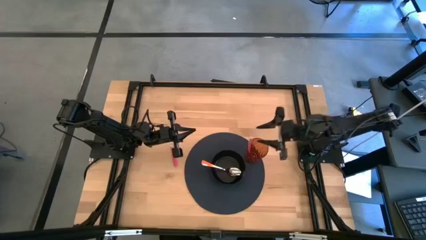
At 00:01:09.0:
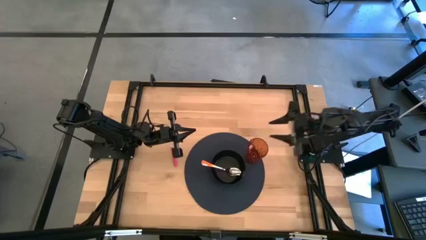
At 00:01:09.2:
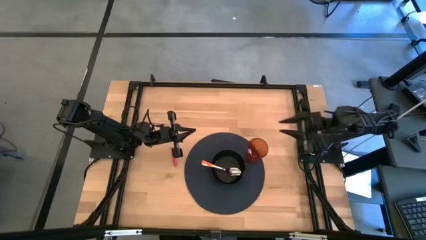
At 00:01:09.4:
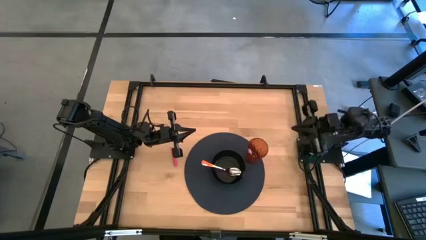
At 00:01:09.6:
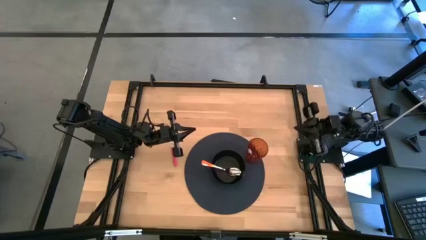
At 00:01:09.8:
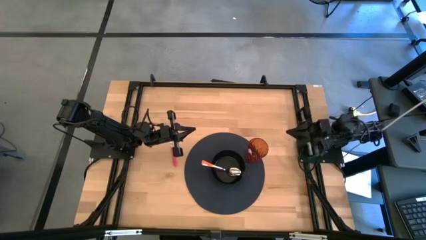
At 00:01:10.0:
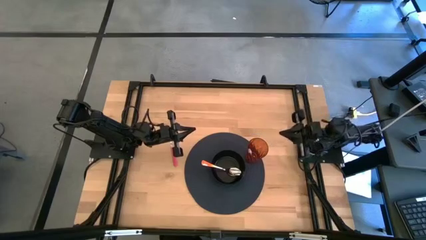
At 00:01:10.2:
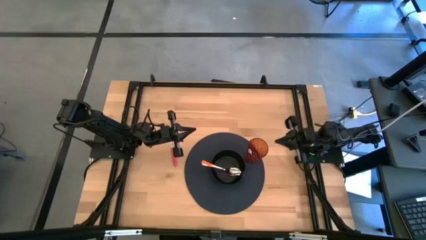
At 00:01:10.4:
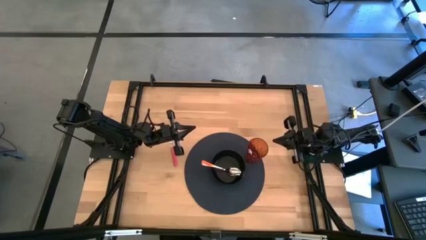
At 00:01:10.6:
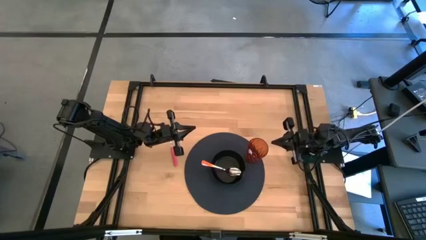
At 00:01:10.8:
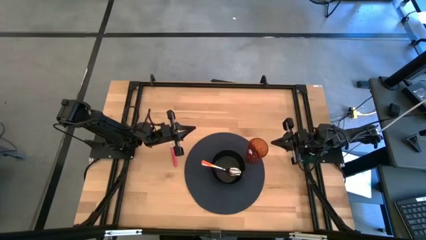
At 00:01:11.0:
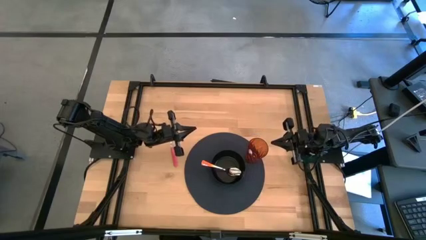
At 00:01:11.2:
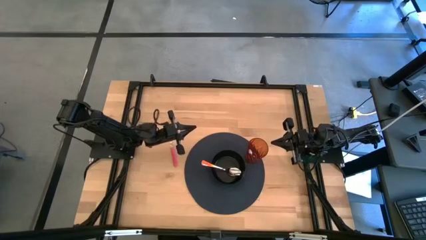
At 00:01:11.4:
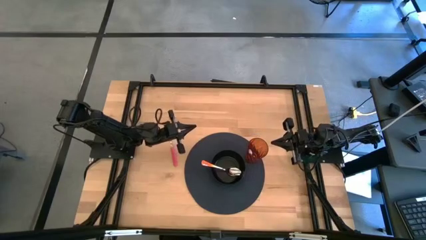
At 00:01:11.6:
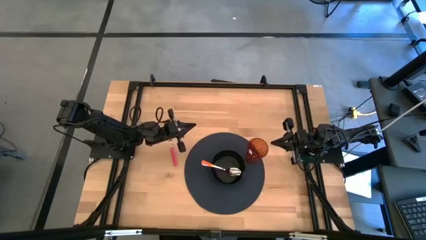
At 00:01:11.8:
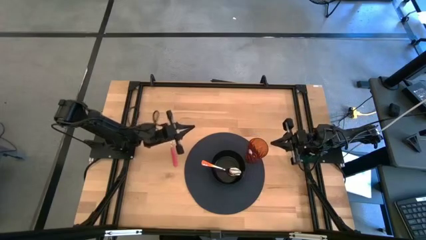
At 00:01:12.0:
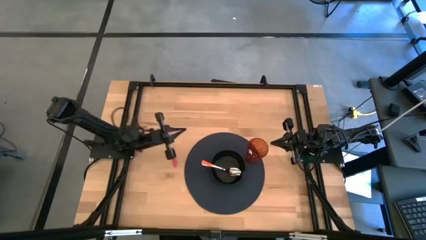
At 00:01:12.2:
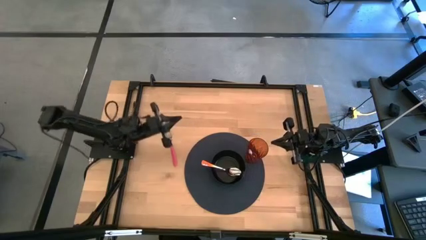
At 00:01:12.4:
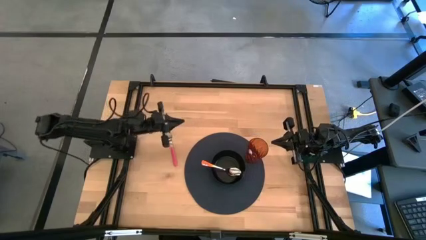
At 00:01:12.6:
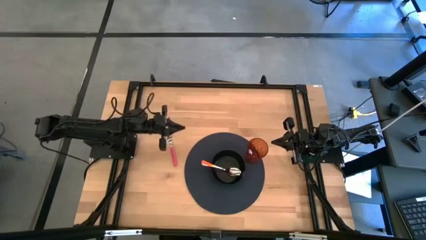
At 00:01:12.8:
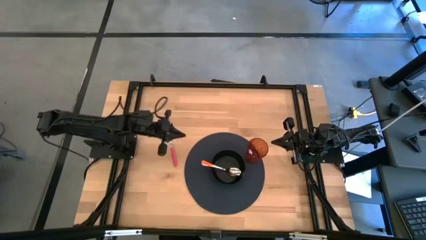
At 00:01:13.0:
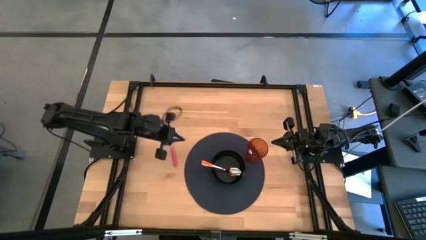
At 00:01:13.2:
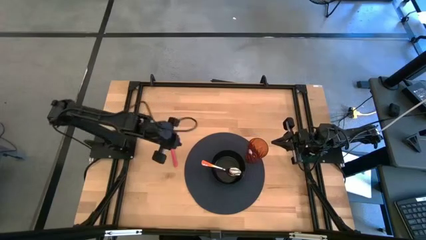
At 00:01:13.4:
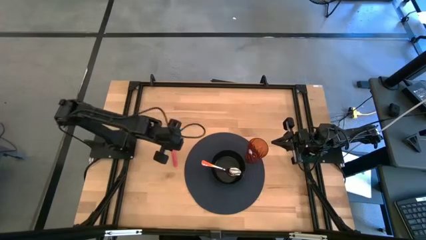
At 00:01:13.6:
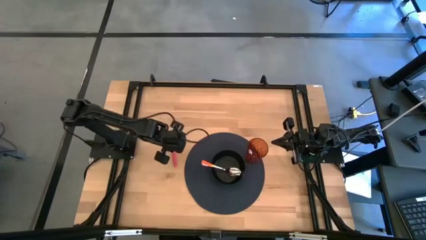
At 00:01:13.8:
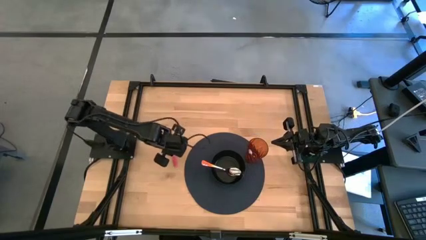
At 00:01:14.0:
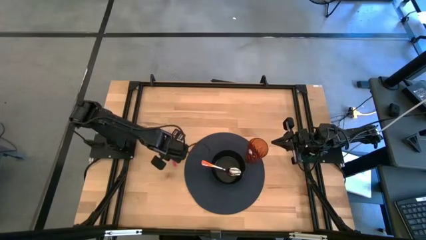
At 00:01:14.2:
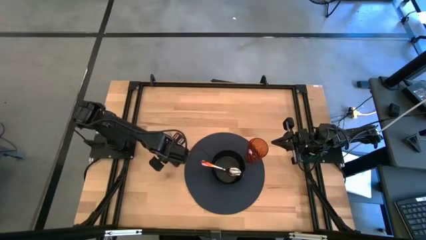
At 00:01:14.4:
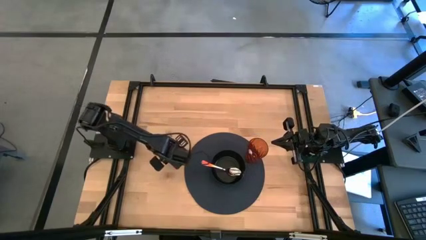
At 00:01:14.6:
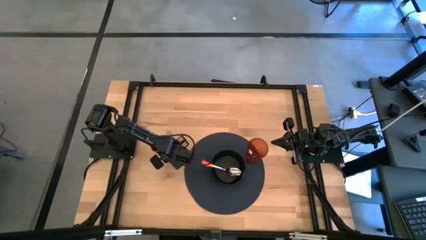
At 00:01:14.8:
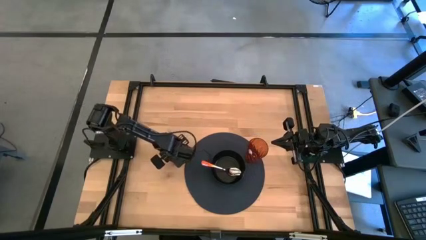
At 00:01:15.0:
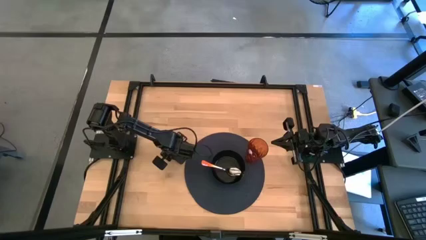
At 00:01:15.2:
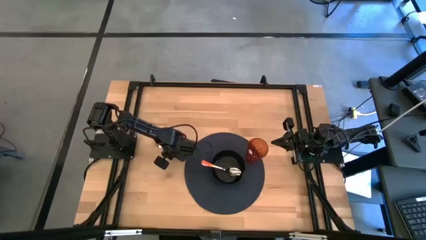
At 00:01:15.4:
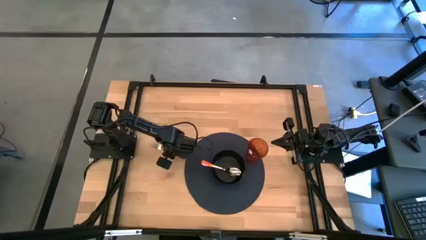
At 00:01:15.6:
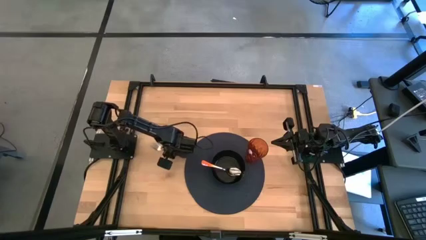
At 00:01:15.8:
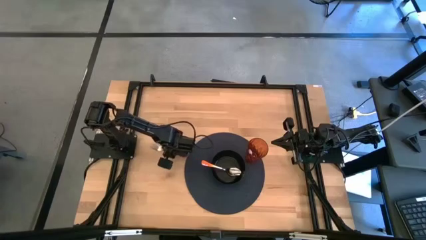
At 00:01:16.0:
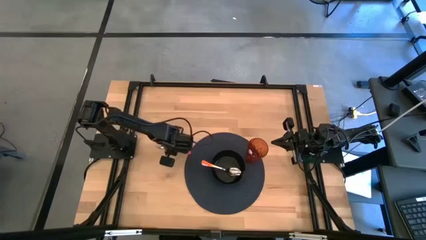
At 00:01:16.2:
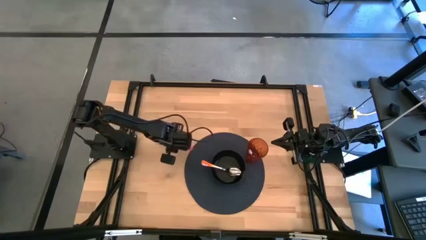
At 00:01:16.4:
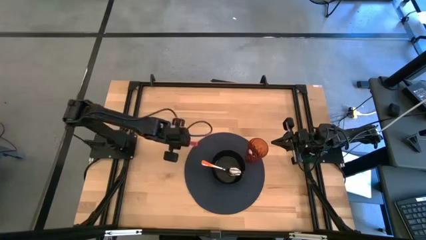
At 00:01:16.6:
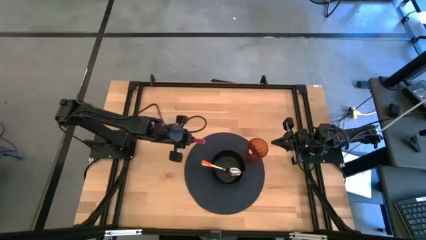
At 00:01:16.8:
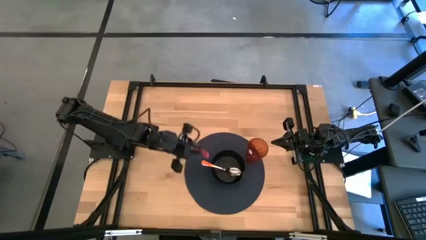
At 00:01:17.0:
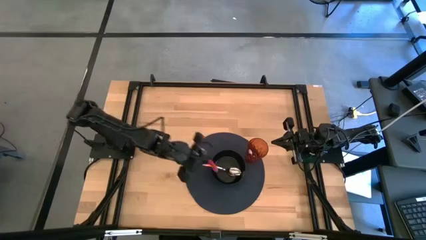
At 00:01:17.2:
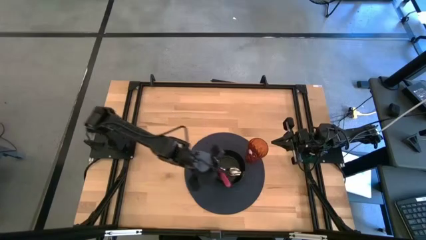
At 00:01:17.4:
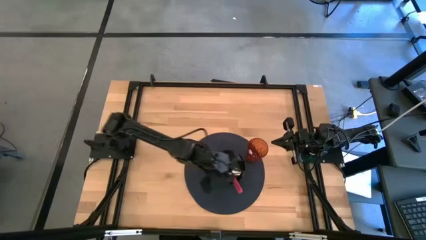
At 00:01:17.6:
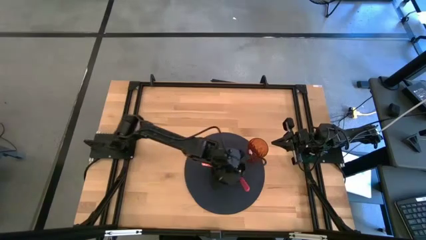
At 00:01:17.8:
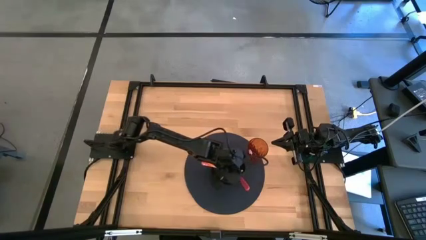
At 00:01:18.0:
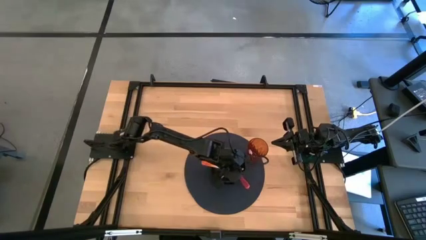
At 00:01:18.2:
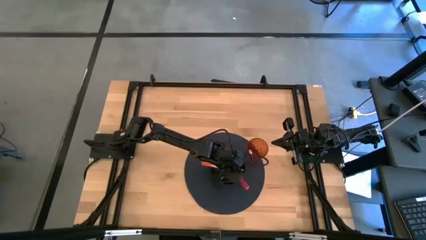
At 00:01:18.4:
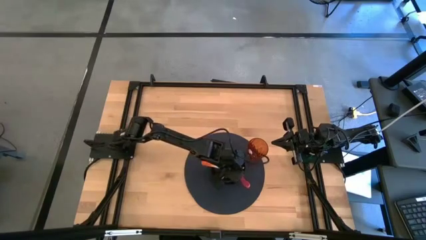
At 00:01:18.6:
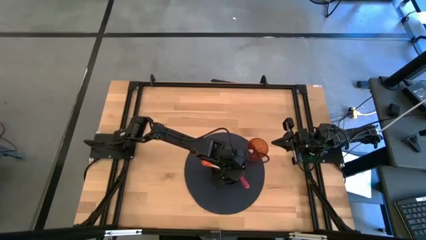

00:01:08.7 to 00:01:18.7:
Task: Pick & Place Utensil
Put the pink fork in the black bowl

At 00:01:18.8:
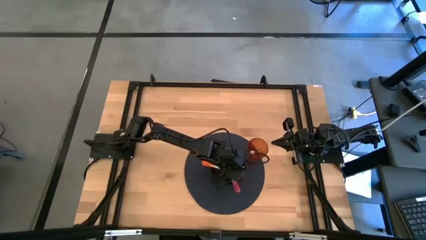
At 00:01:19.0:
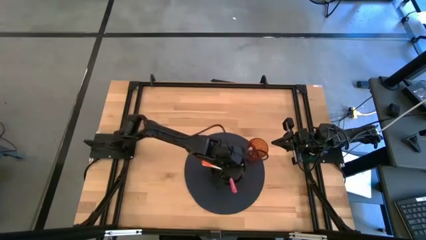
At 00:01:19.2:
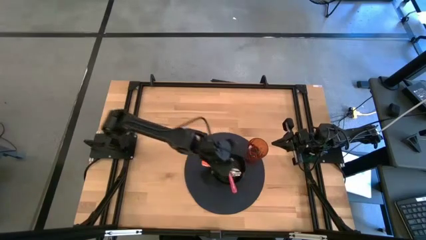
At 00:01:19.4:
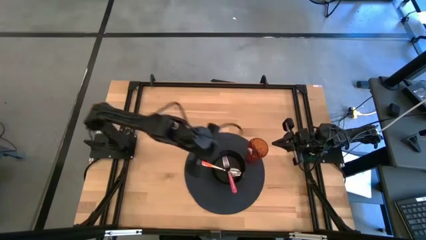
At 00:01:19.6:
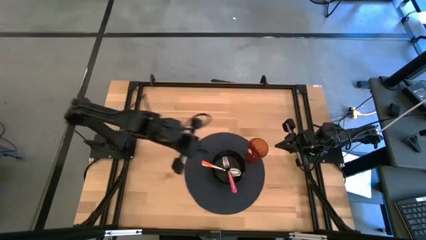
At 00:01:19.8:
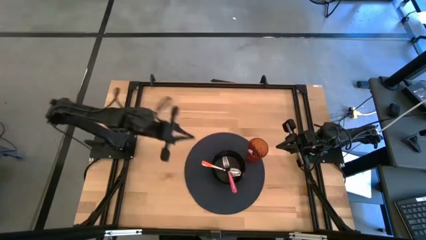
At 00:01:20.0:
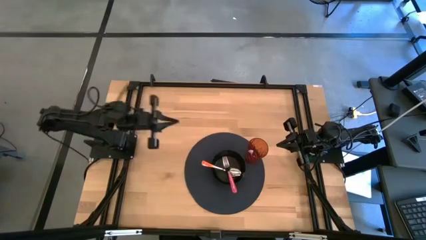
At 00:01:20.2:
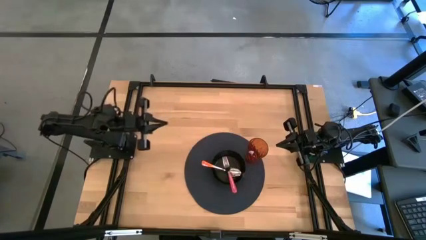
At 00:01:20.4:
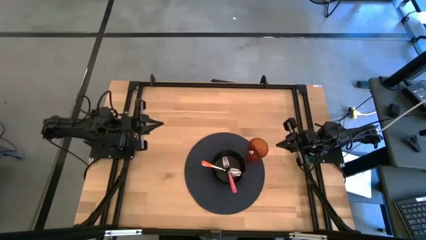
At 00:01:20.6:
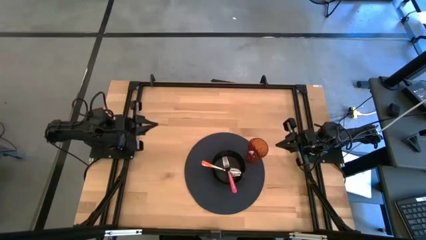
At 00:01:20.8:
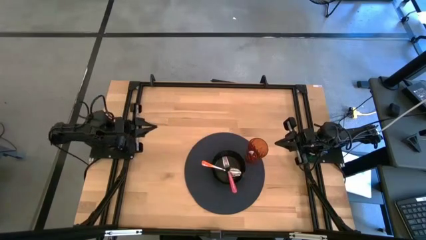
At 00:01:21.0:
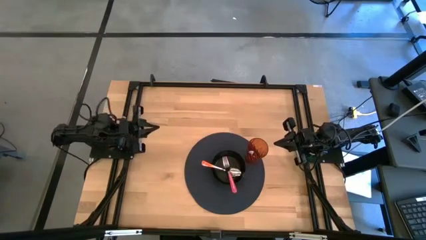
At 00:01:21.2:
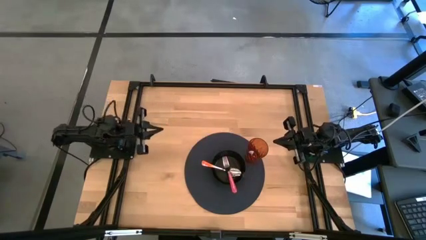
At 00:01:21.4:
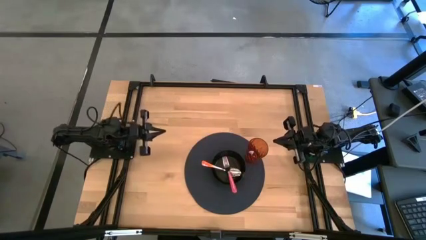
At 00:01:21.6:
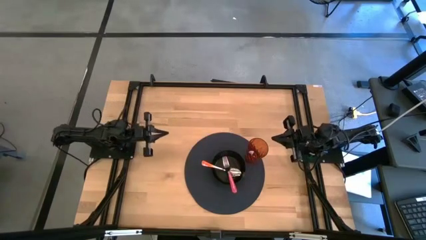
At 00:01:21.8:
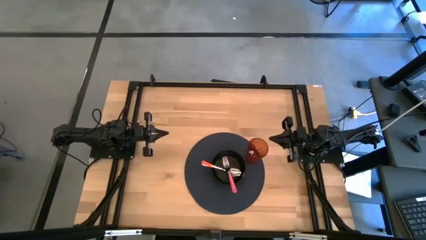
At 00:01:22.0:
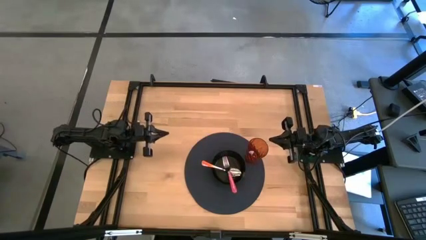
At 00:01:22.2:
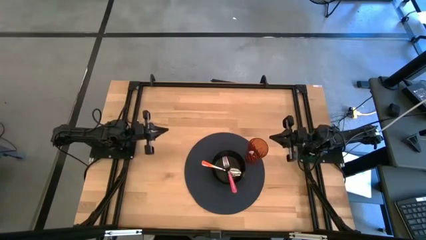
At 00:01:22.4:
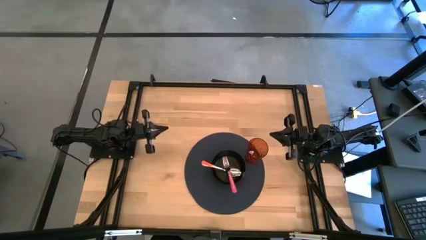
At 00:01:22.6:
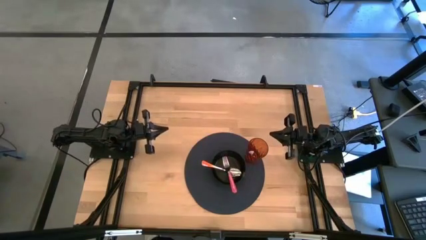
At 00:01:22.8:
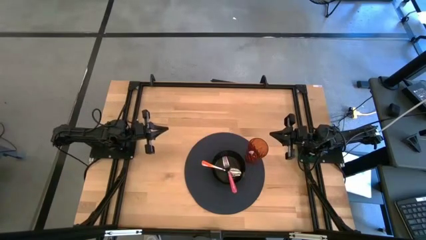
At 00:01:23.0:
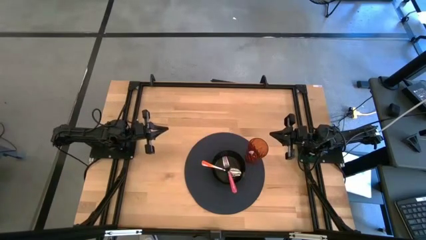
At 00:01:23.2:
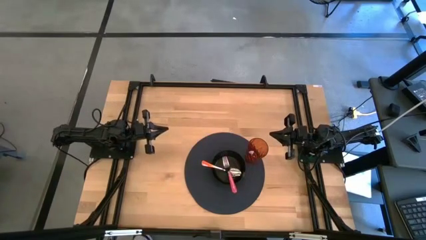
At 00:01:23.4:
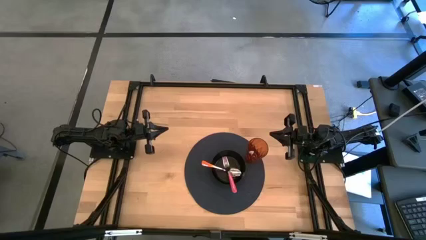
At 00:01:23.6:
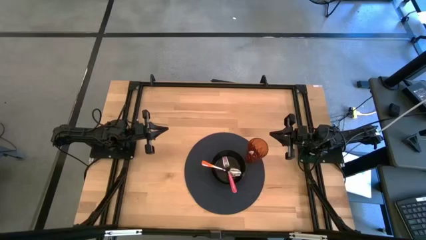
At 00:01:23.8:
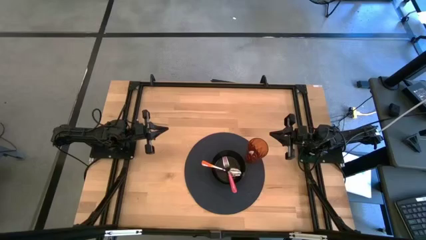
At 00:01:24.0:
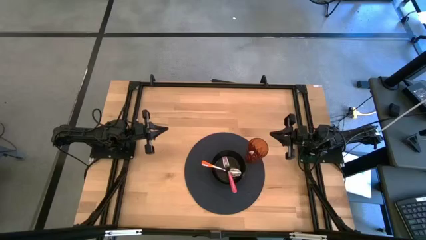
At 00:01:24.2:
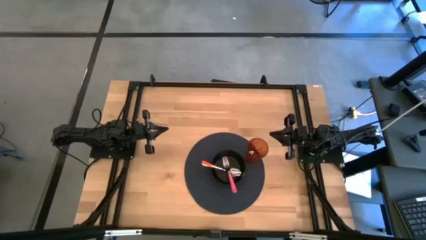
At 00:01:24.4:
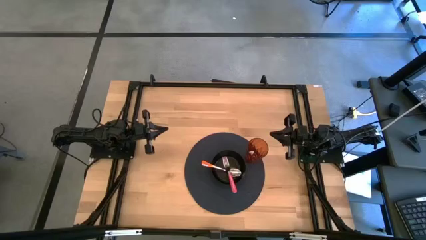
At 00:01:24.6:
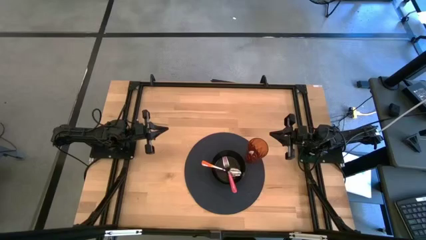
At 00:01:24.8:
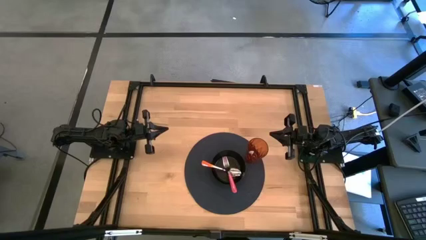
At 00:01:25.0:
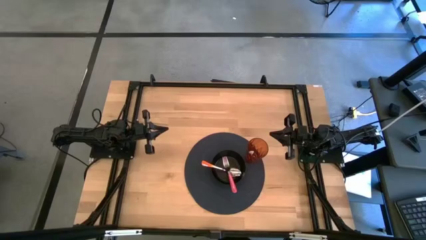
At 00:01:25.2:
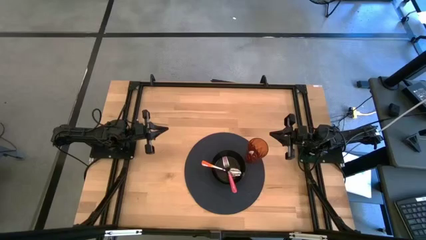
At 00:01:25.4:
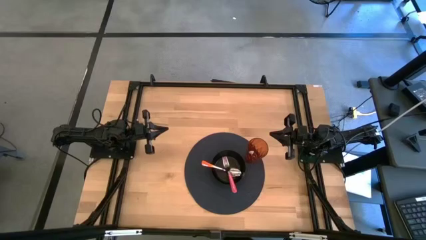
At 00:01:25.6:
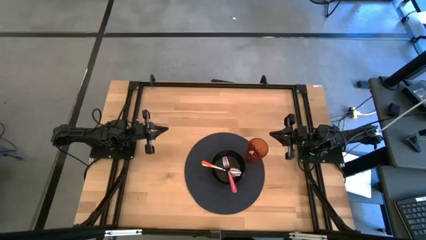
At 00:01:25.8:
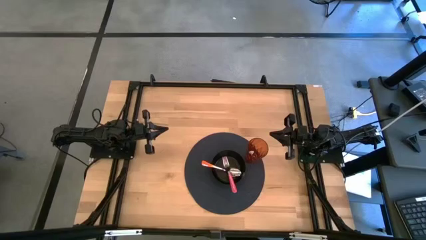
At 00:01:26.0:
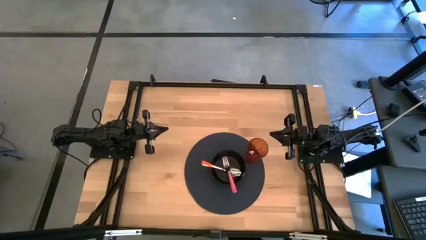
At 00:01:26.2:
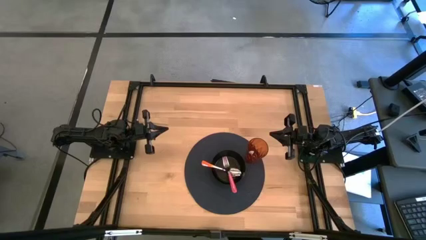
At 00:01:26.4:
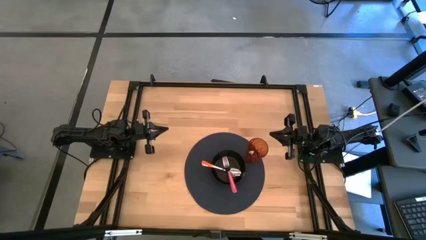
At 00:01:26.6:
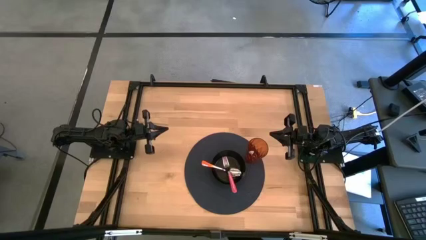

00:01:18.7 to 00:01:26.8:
Return to Home Position
